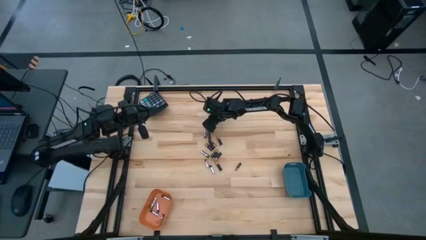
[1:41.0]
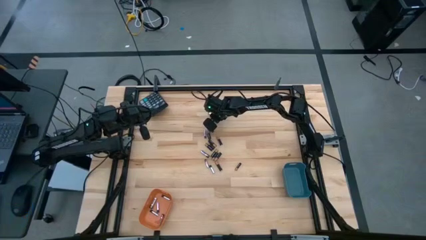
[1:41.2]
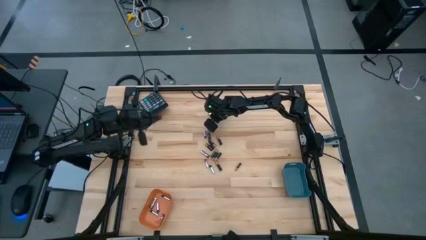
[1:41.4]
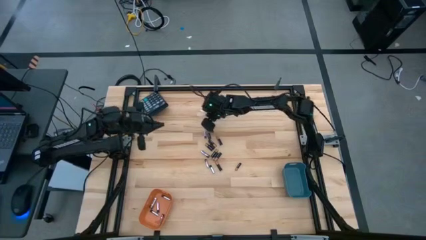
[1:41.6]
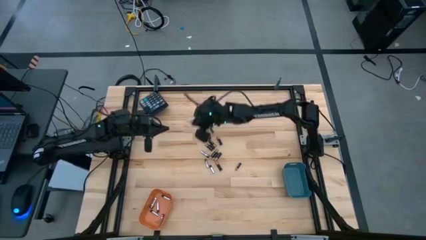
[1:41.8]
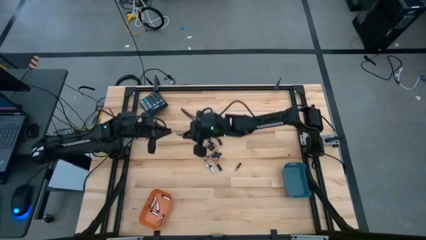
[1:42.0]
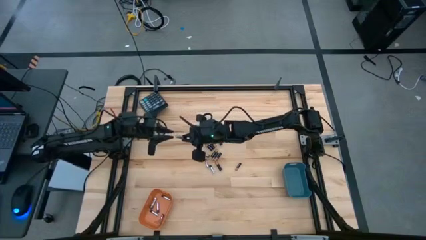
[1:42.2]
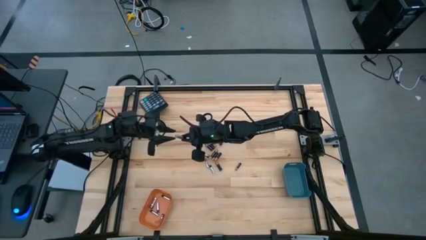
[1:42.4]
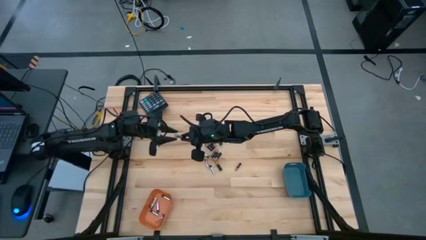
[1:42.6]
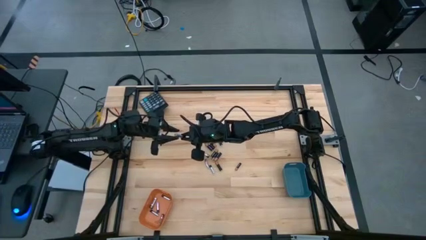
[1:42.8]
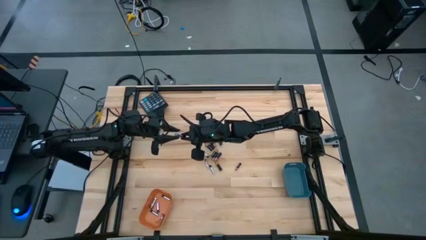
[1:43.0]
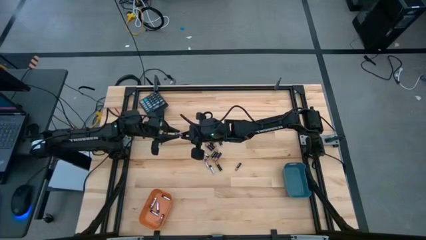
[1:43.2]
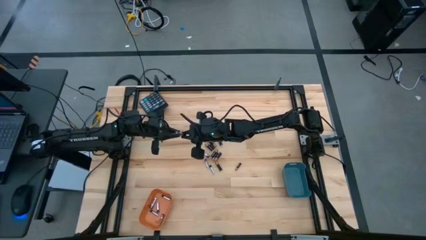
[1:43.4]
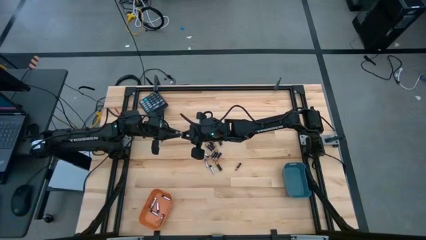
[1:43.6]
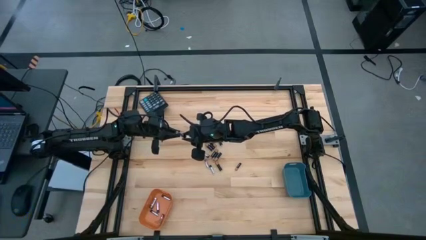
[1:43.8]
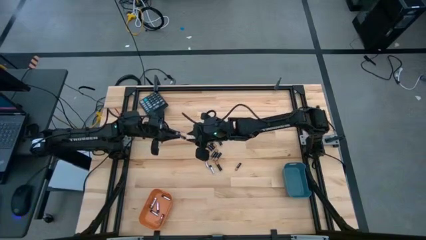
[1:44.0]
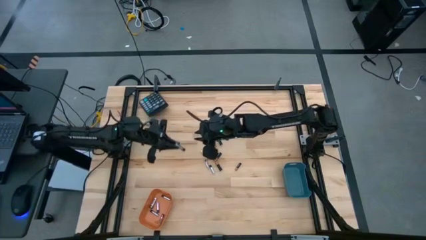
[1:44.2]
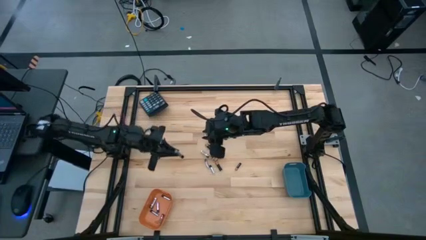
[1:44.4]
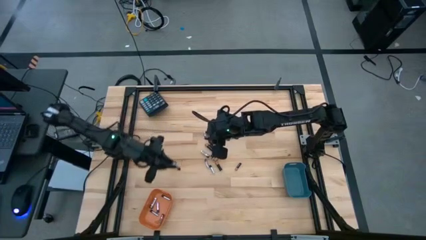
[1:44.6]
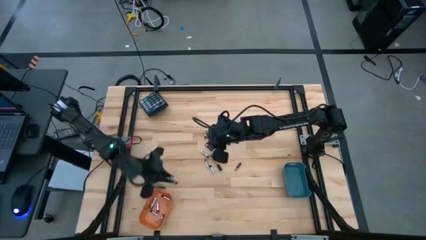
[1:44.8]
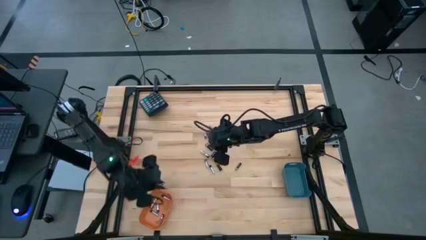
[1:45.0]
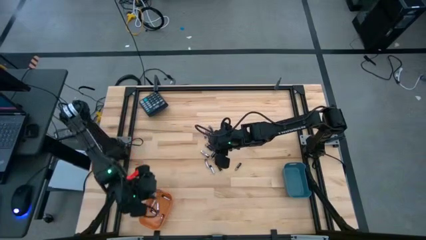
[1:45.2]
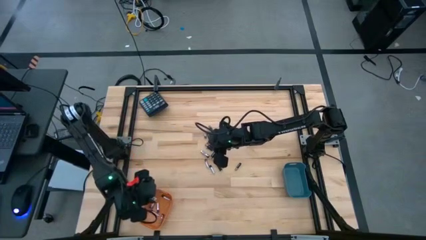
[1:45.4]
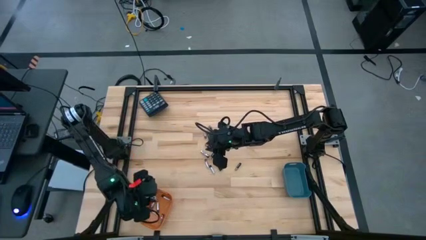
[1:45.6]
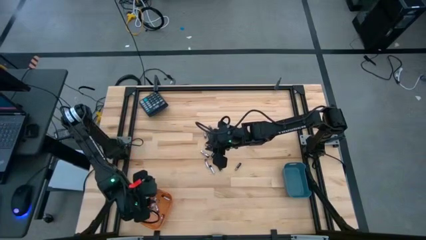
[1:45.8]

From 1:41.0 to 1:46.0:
Task: Sort batteries
Put the silver battery into the orange bin

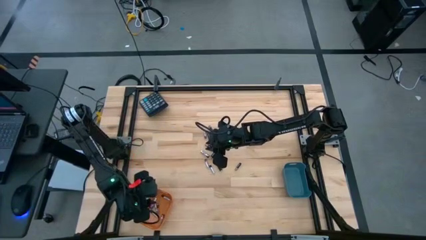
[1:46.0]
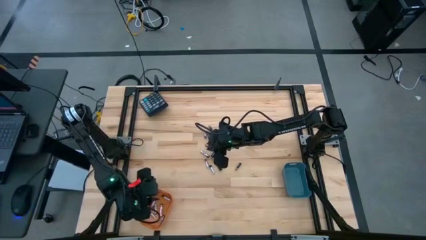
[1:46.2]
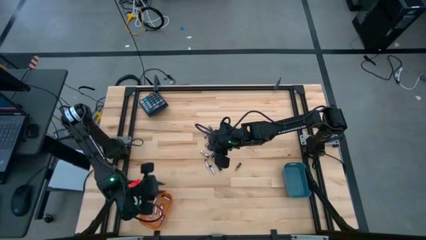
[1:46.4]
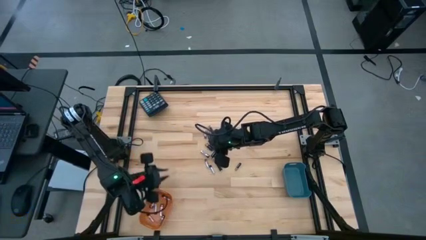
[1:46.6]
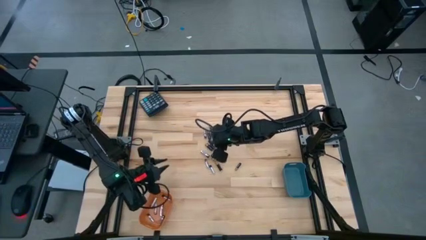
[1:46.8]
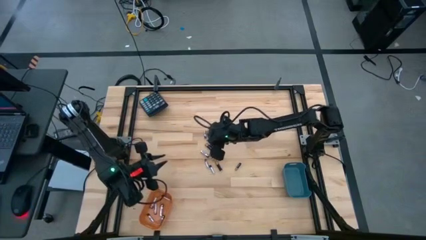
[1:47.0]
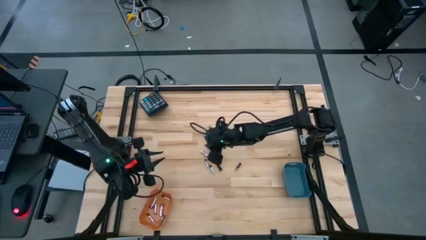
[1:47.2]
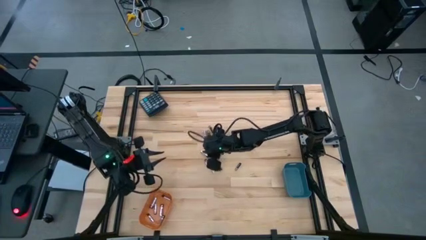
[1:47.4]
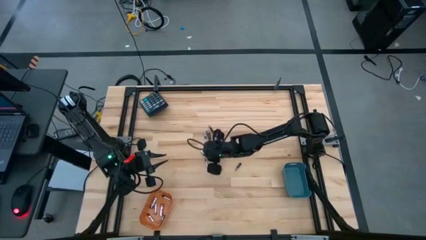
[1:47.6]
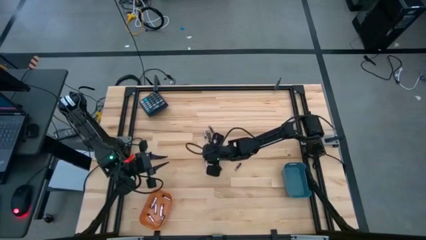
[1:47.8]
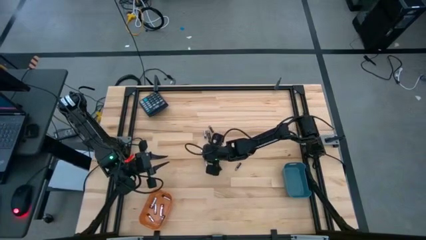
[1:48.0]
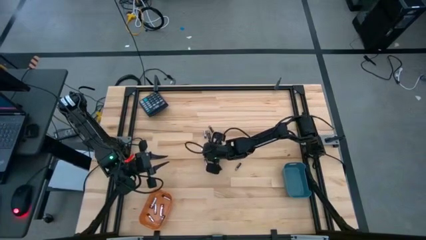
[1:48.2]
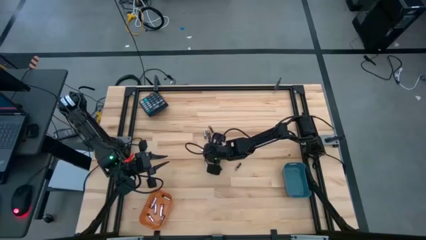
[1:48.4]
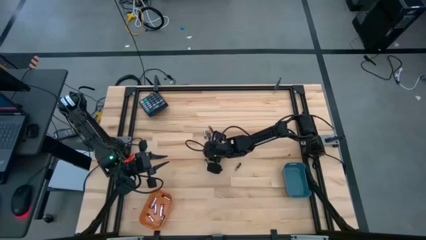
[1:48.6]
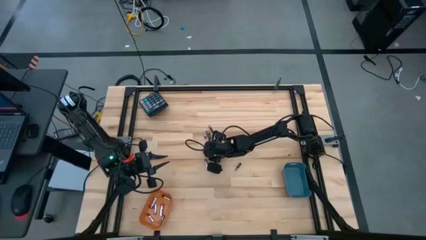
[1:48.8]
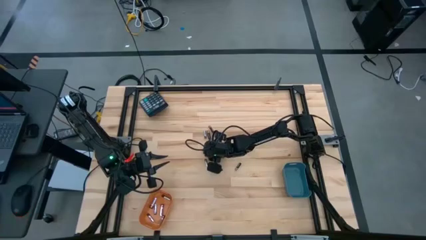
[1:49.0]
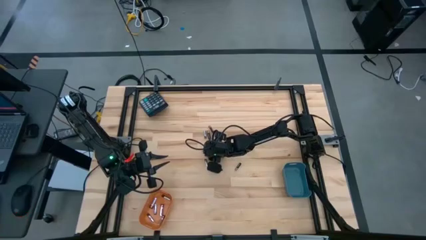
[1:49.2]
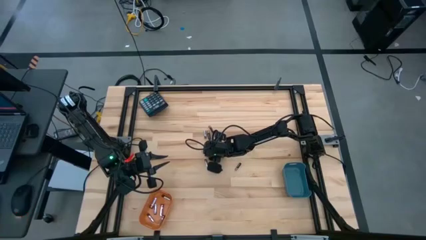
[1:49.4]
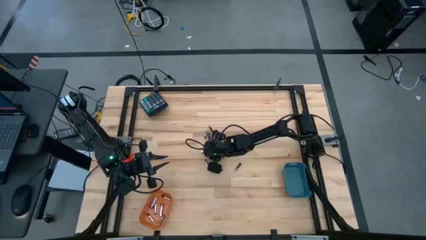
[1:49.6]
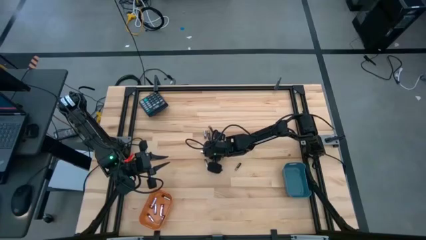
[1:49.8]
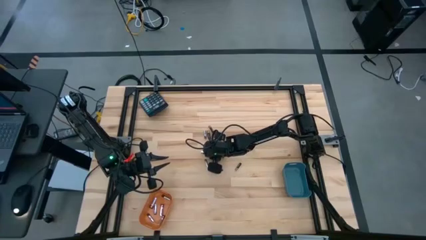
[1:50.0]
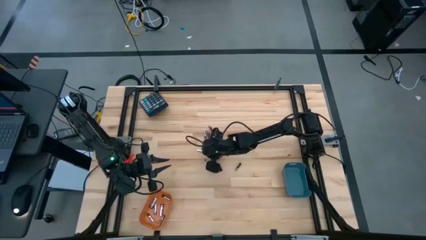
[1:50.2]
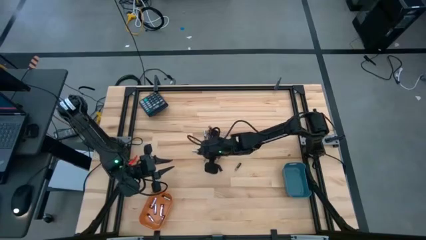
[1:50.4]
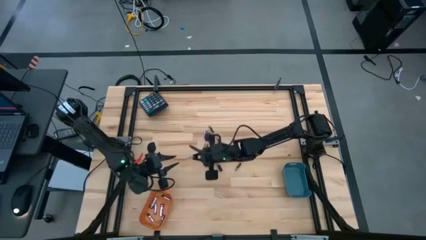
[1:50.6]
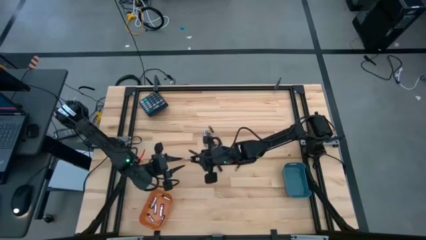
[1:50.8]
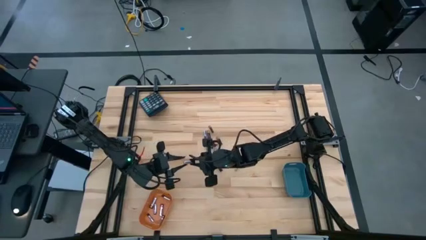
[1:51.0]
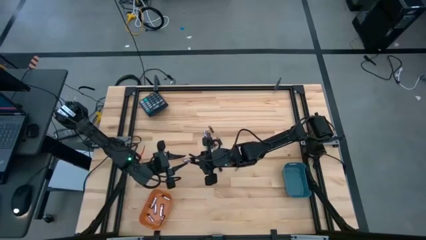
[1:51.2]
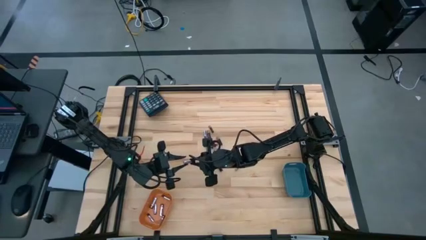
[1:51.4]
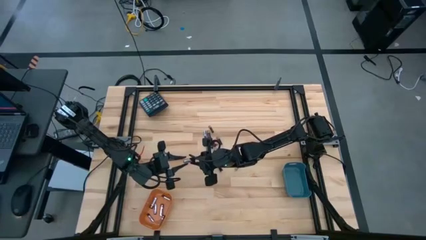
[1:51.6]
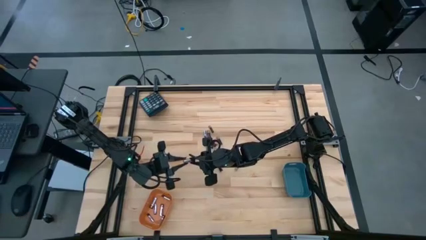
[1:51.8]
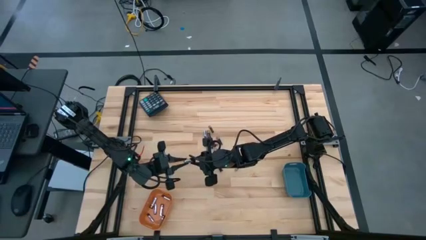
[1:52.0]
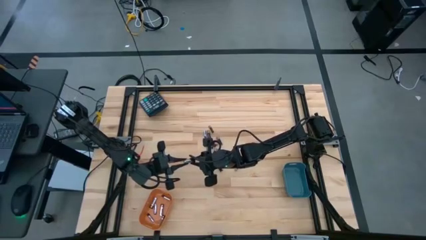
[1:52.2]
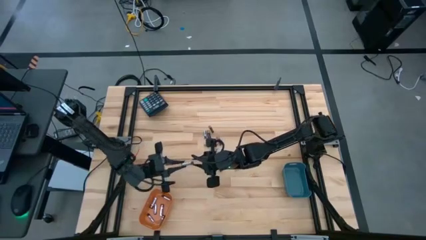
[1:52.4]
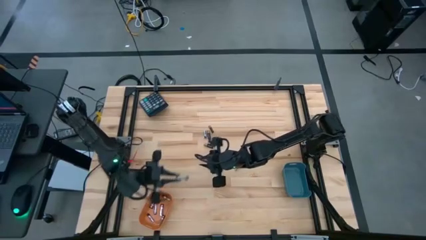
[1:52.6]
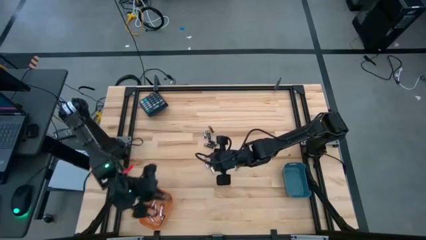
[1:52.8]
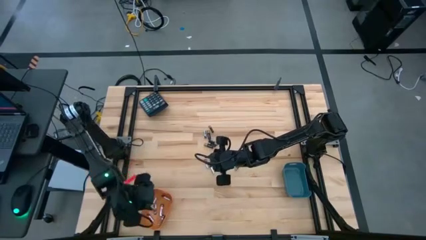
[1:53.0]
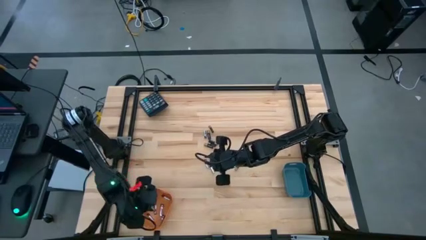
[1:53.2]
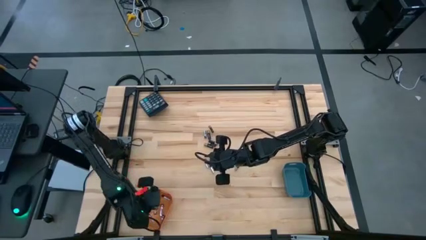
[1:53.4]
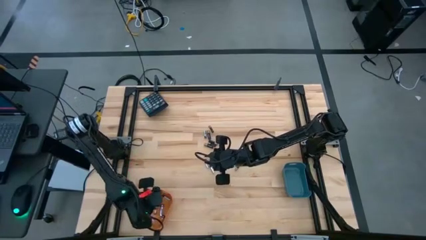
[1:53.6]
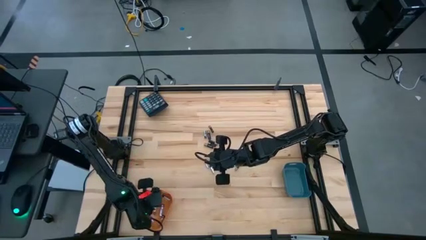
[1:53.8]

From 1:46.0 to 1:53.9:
Put the silver battery into the orange bin

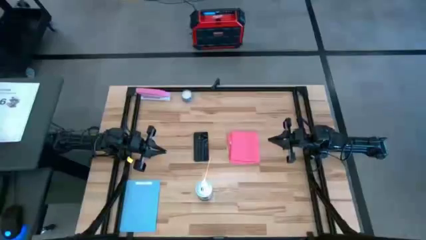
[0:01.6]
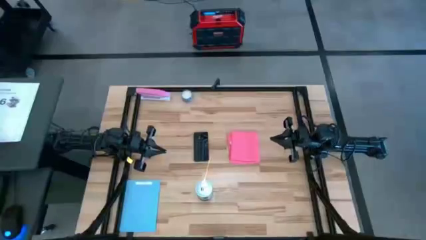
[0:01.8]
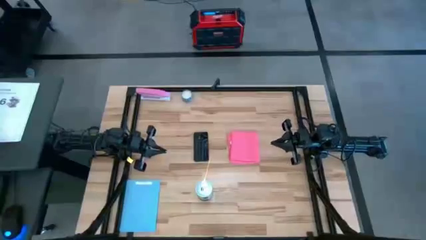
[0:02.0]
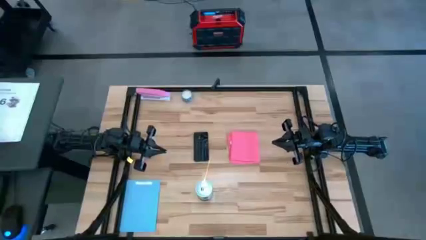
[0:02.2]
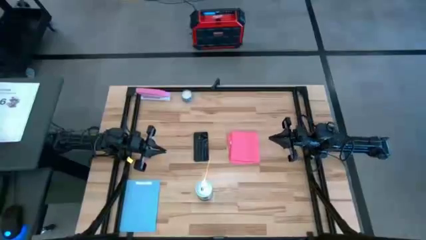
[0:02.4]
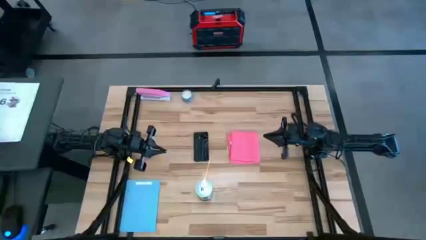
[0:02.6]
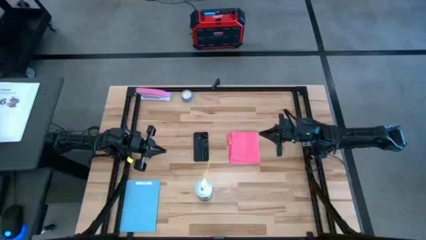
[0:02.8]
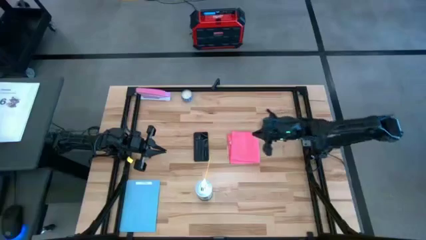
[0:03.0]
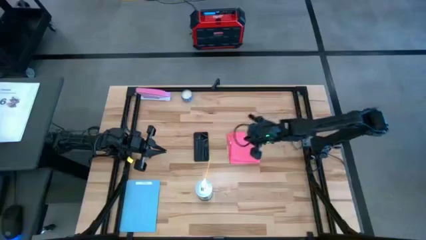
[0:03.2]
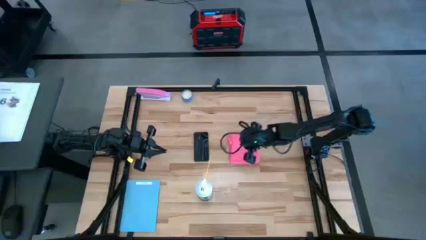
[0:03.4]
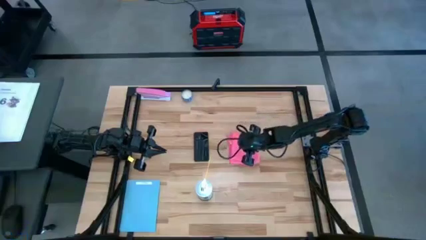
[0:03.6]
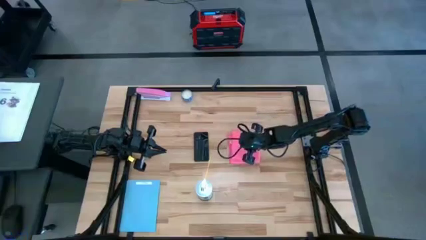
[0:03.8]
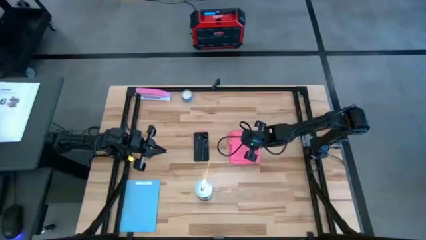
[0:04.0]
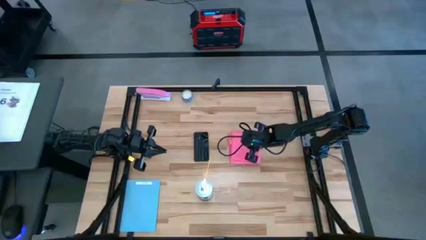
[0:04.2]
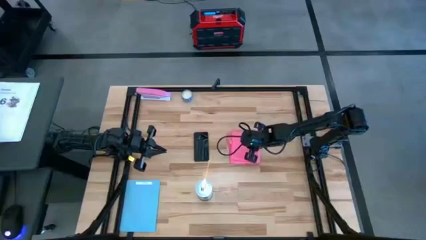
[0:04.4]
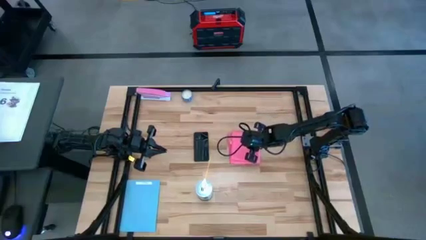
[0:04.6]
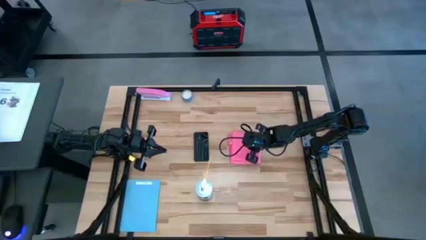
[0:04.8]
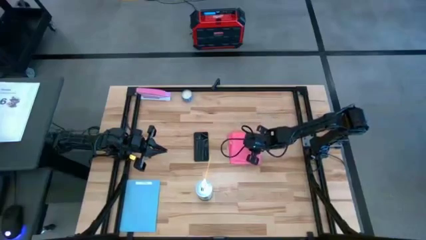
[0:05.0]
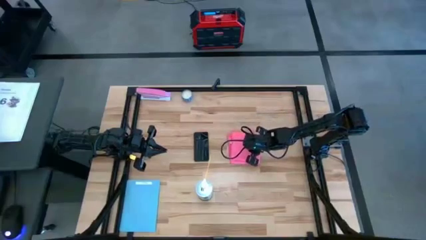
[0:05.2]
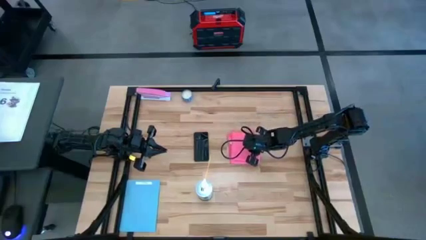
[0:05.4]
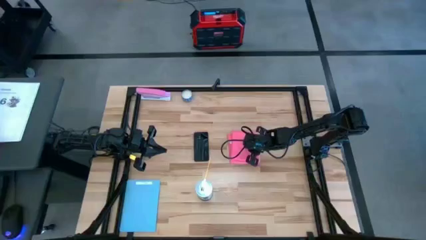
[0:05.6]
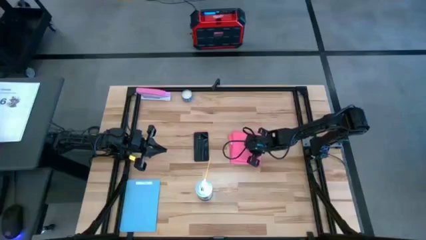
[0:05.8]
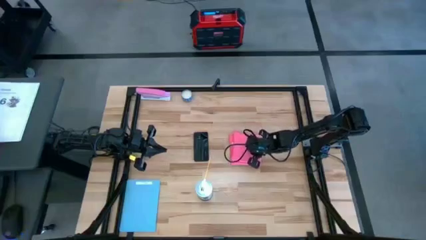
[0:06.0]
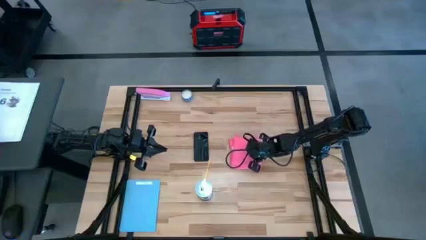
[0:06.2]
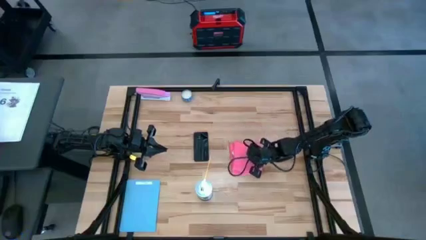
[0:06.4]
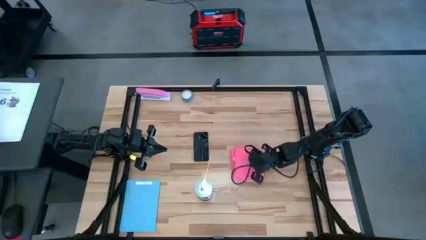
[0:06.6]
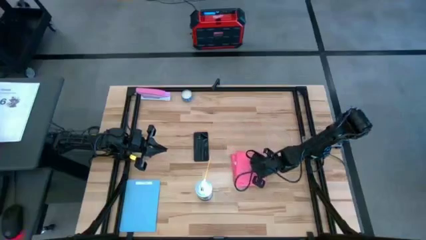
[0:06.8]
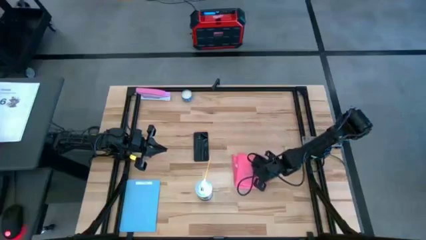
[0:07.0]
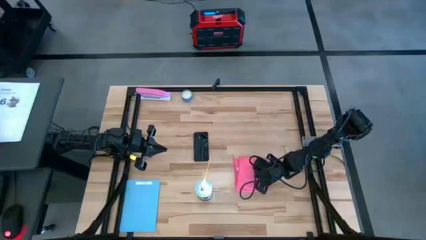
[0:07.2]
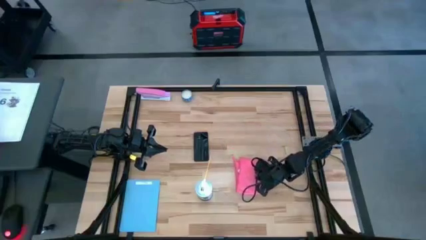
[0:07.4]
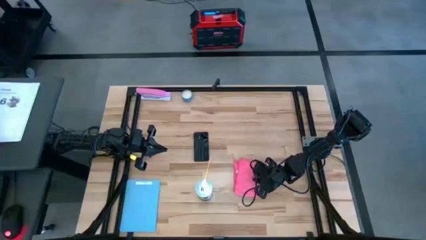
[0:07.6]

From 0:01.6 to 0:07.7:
Task: Apply microfiber cloth
Move the pink microfiber cloth to the center of the table
